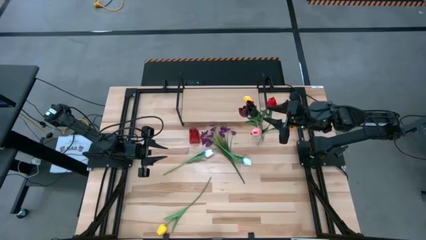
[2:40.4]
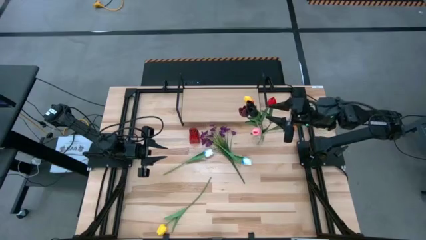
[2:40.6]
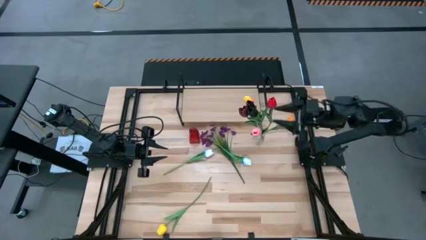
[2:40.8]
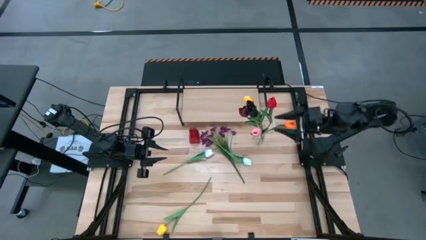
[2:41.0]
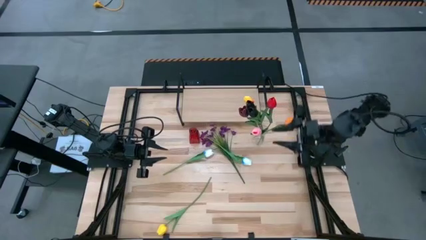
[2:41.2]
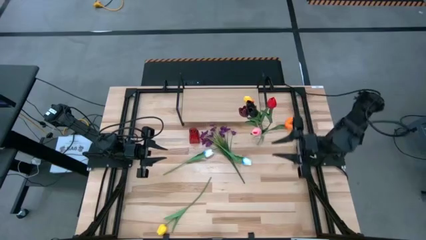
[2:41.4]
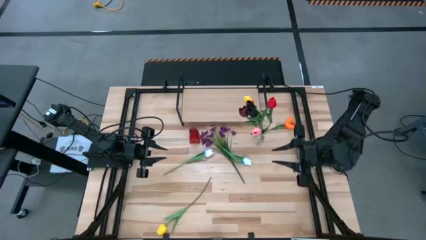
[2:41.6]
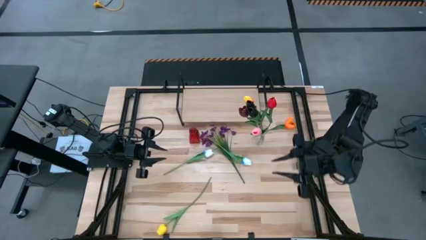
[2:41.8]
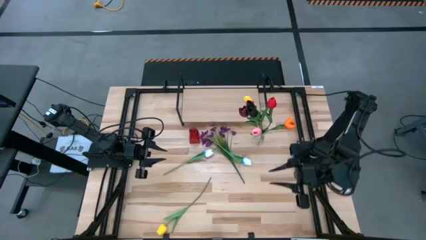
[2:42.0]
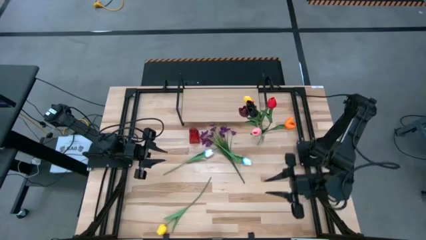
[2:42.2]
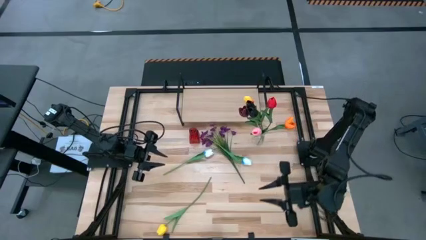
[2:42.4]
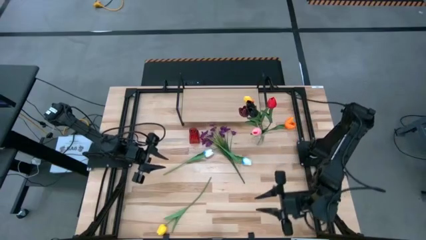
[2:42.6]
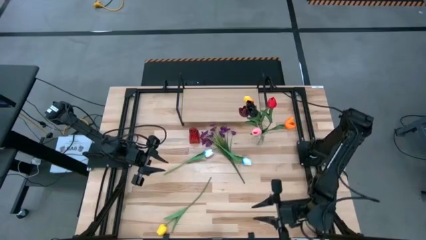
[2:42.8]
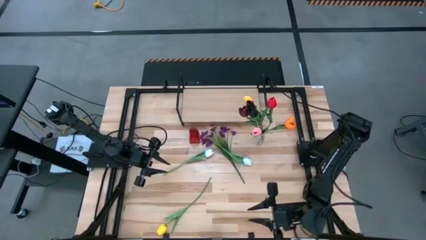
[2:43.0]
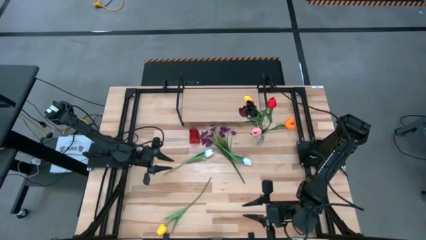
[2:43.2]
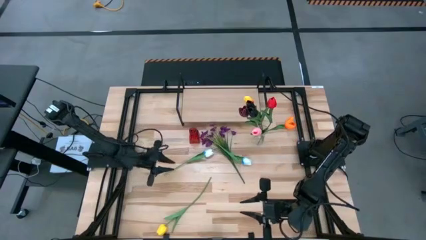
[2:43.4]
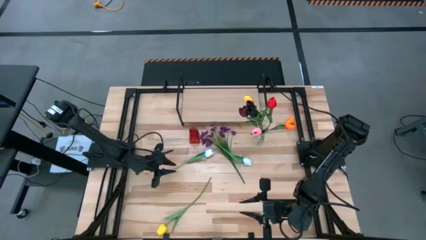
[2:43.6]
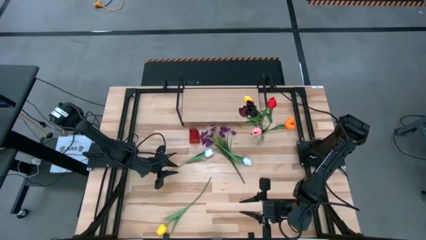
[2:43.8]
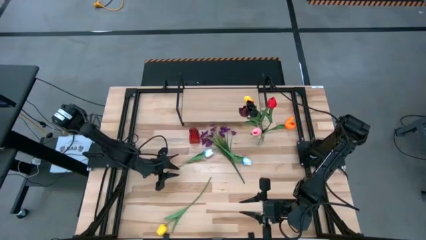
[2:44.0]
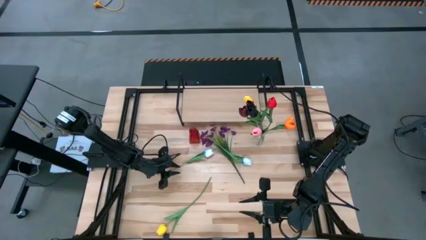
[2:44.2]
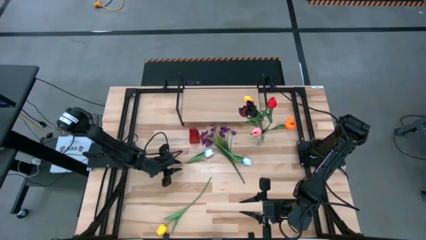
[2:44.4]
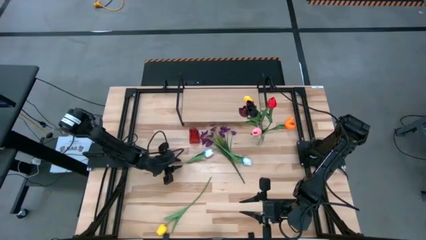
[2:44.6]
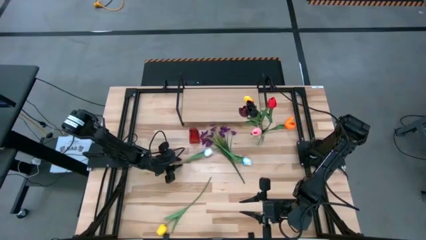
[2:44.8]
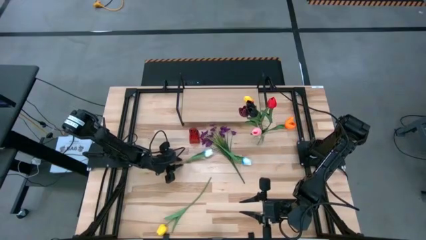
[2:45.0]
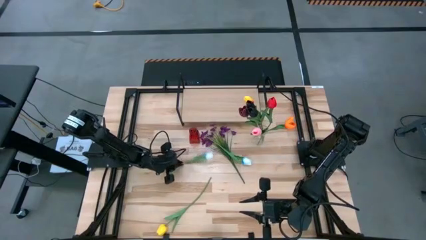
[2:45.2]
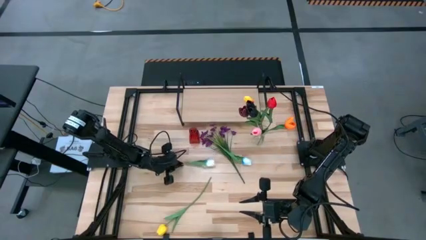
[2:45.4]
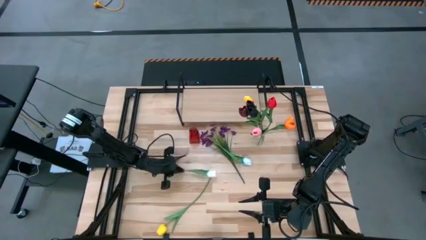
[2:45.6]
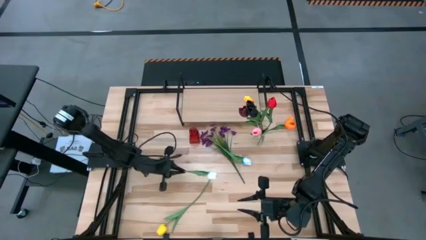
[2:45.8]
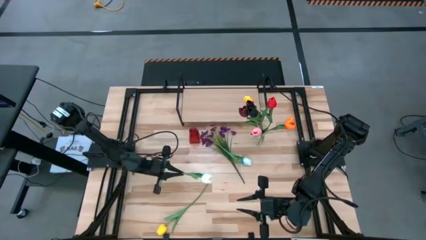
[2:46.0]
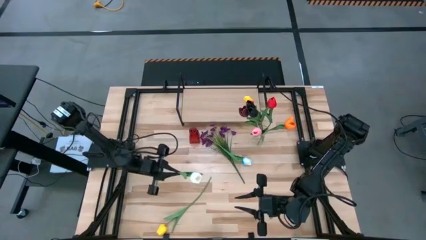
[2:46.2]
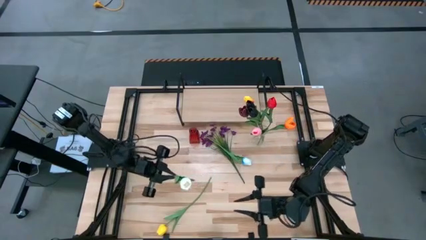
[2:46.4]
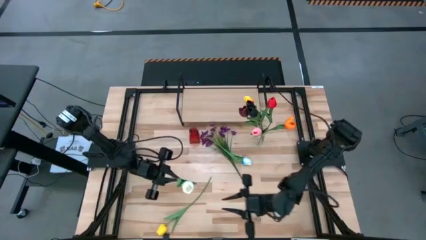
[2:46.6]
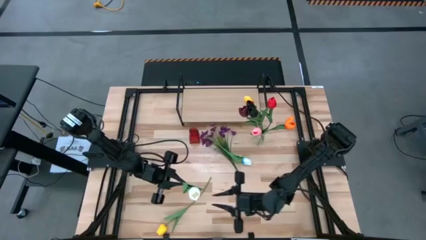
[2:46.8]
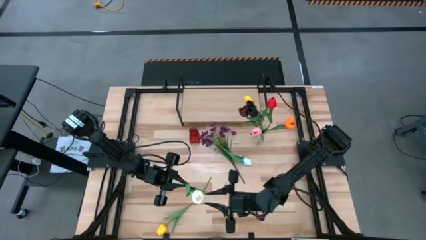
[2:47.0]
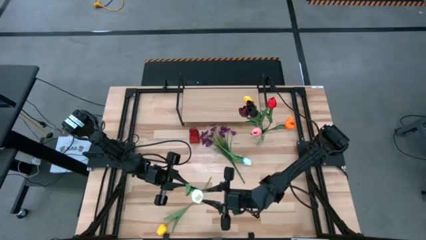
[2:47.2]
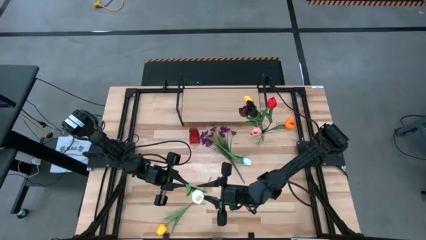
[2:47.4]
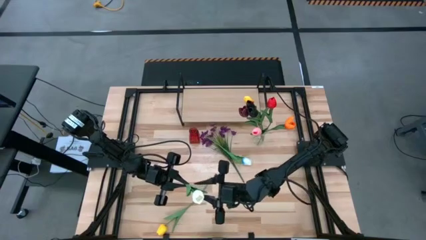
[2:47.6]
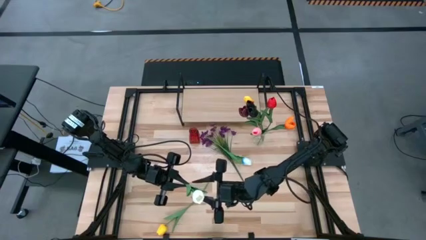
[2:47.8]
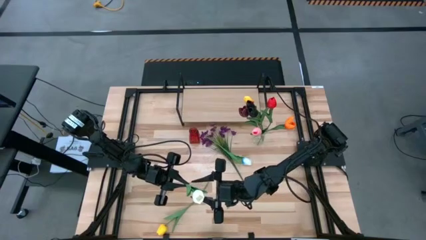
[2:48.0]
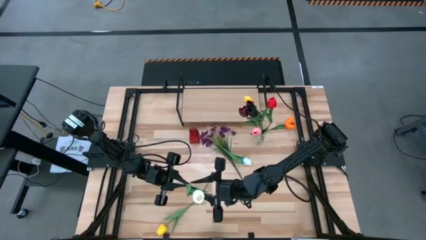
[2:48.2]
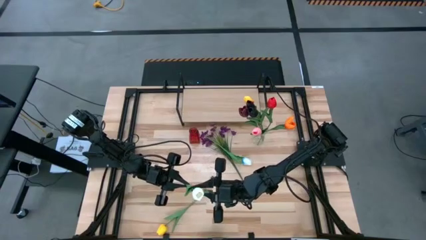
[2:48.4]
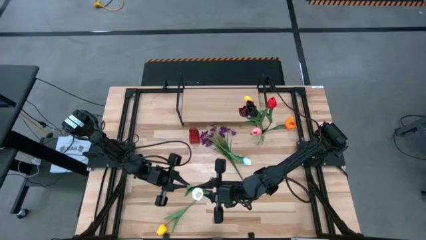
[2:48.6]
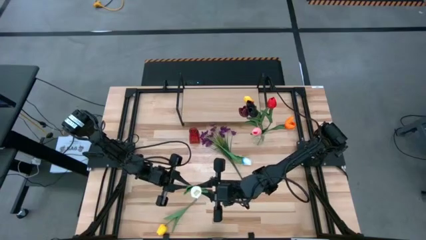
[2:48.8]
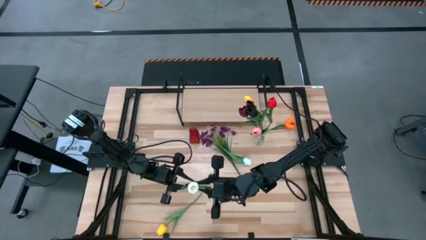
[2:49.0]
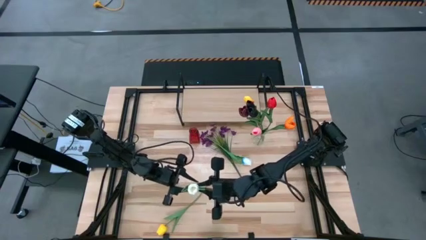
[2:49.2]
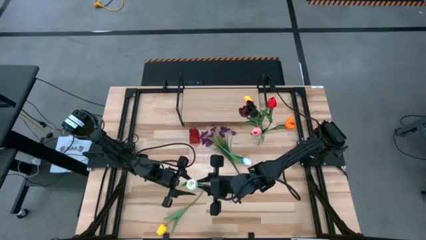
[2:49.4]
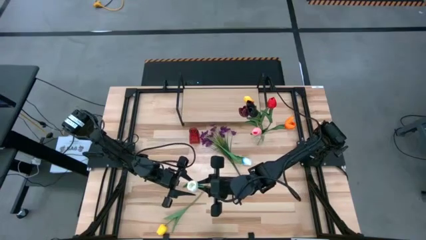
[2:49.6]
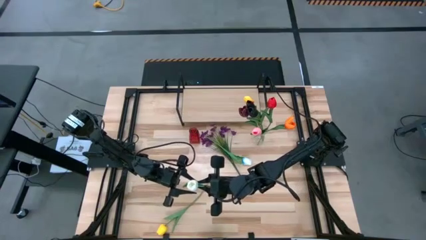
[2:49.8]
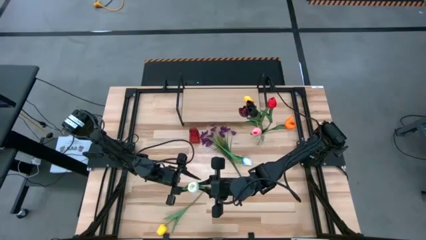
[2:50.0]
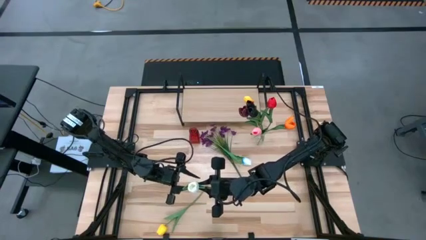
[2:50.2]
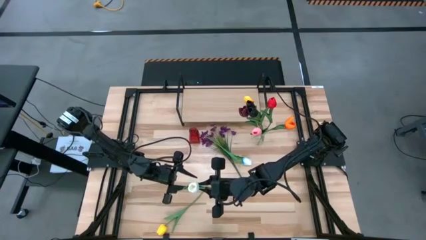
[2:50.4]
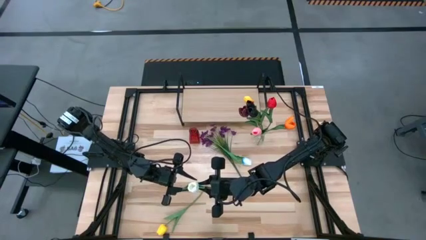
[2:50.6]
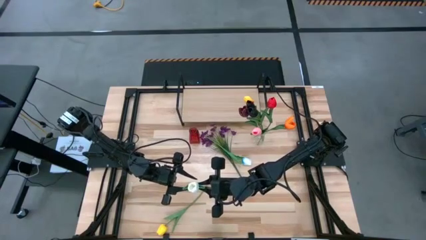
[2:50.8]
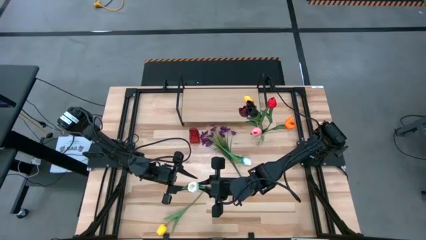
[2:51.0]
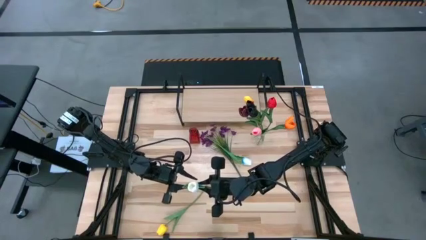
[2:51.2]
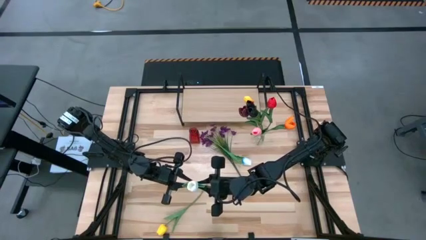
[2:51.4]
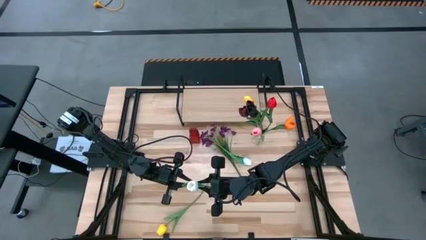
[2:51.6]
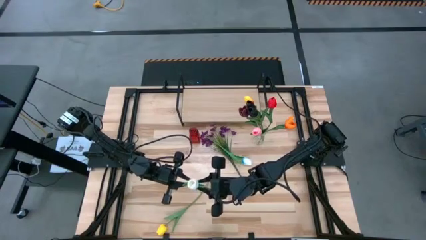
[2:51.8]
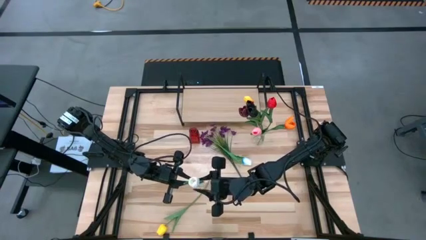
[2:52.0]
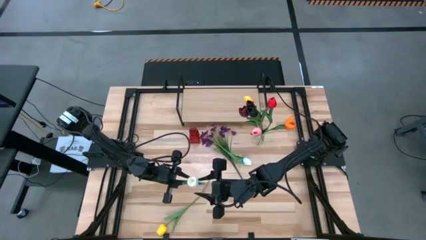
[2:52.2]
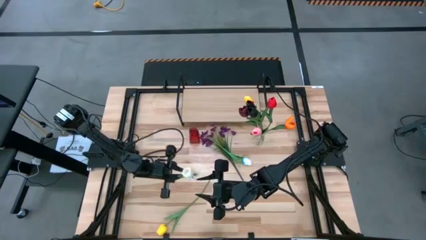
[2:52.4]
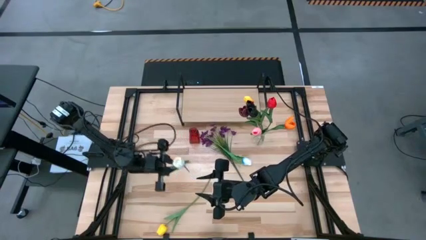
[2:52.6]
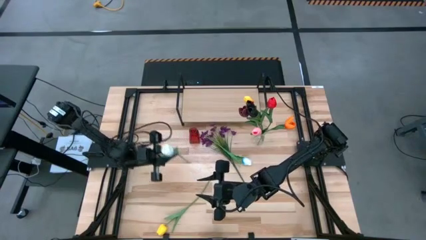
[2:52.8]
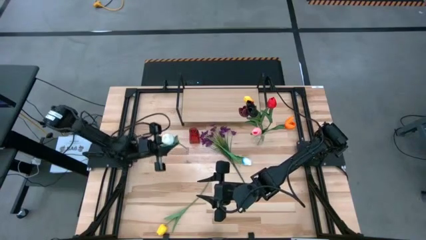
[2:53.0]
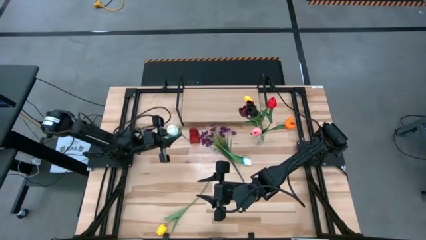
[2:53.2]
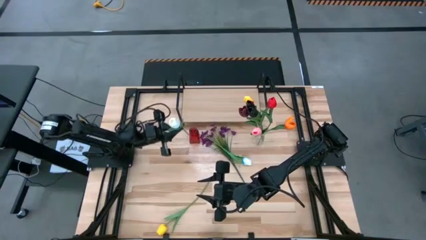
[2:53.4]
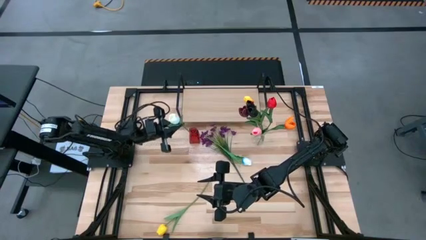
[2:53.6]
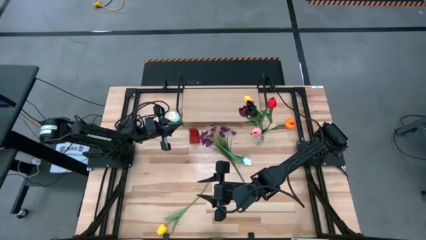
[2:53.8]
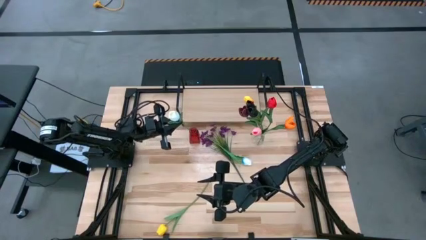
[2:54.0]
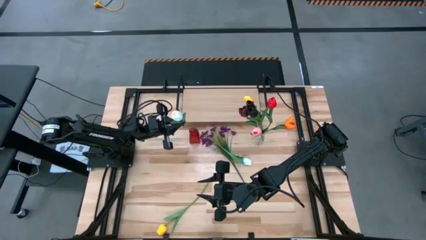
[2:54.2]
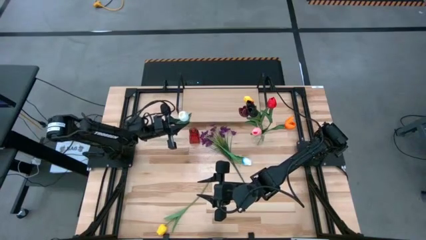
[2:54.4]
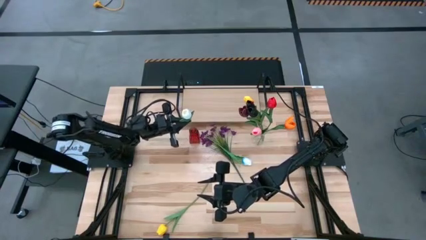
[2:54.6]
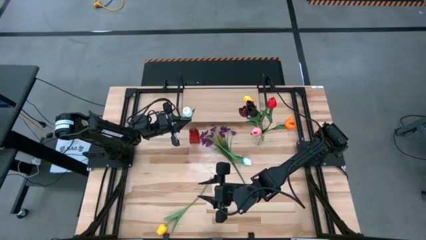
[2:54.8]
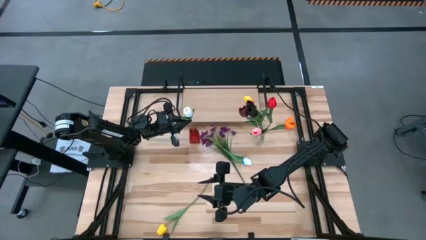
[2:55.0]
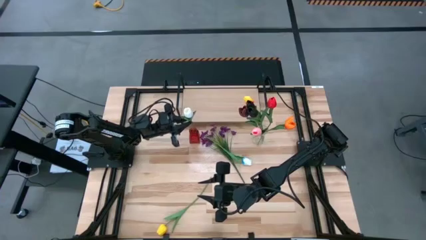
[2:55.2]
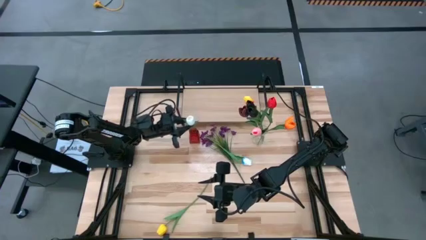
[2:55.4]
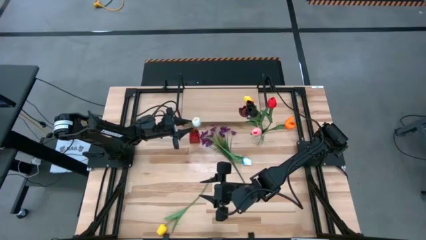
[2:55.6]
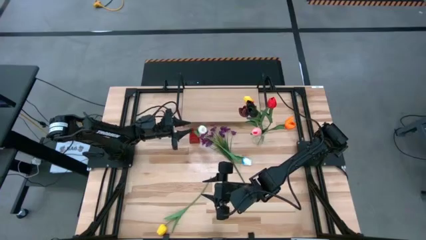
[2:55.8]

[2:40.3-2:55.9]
Task: Pick and place flowers into a vace then onto a shelf
Put the left white flower into the red vase
